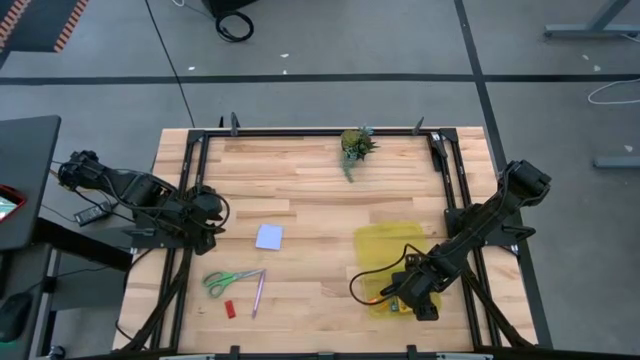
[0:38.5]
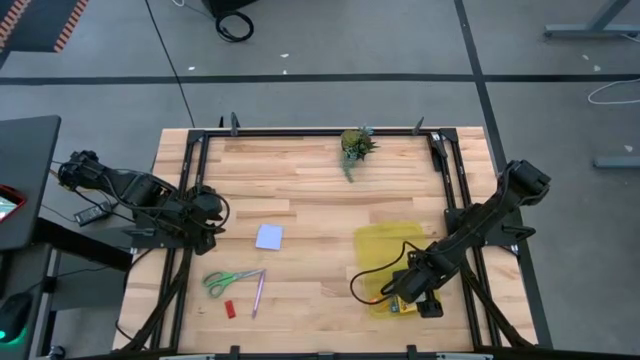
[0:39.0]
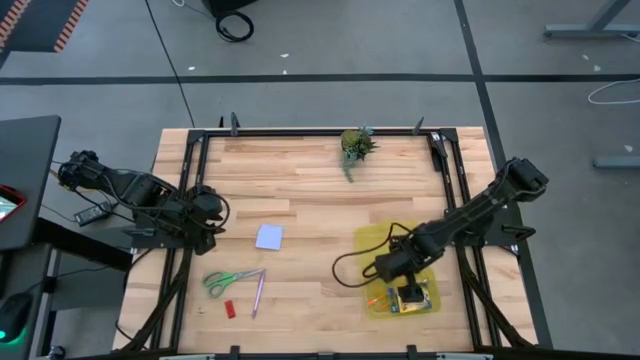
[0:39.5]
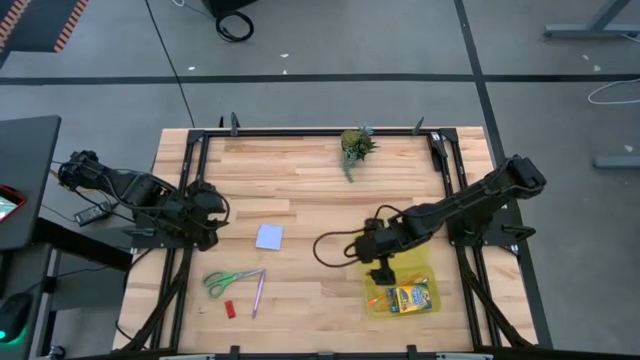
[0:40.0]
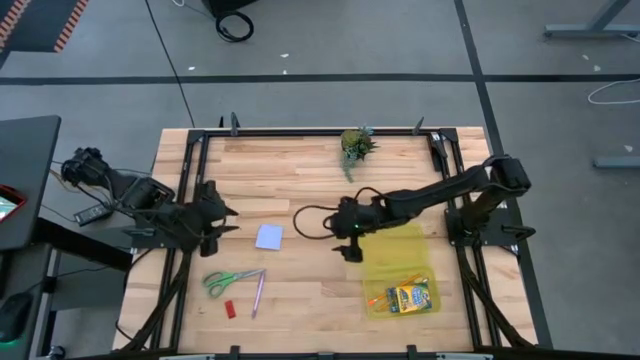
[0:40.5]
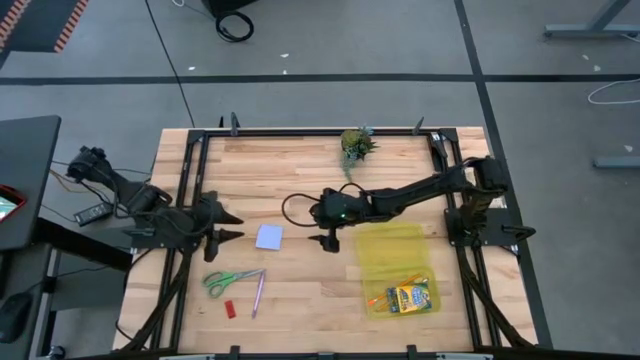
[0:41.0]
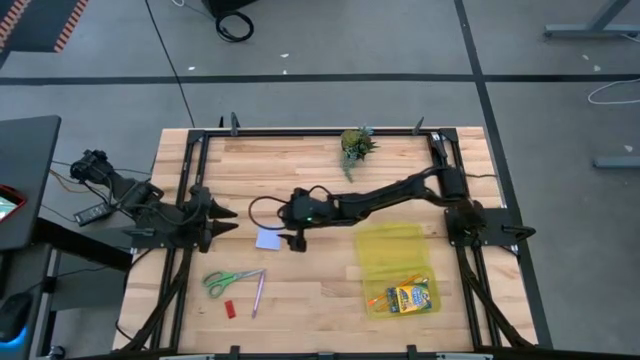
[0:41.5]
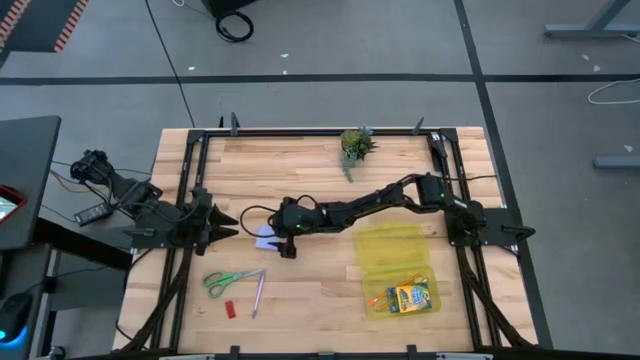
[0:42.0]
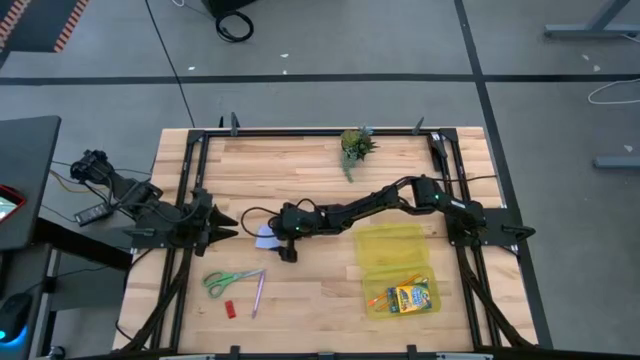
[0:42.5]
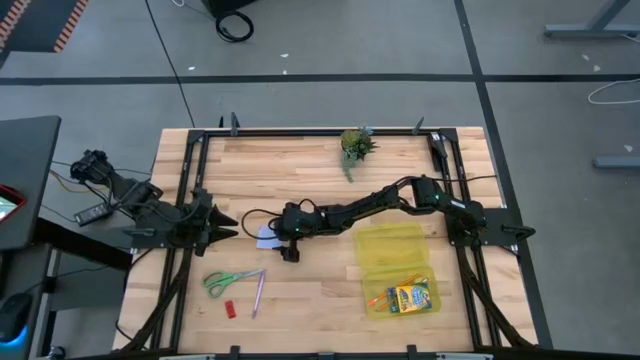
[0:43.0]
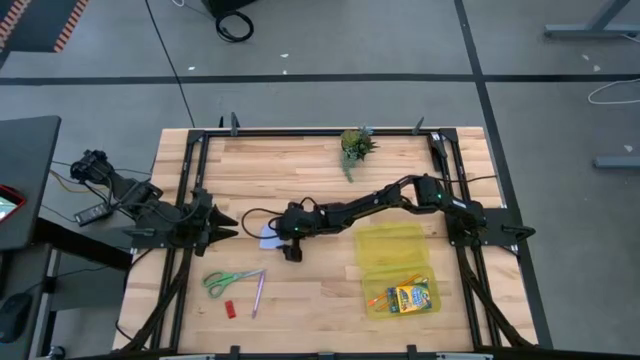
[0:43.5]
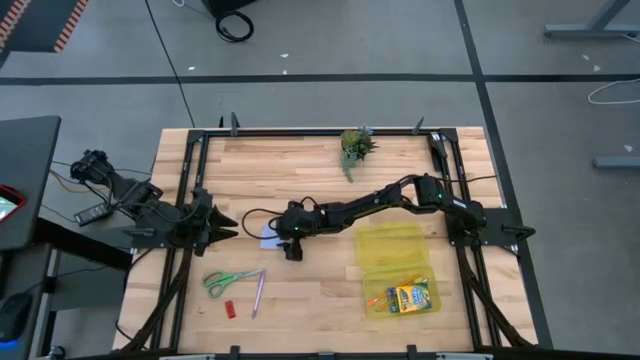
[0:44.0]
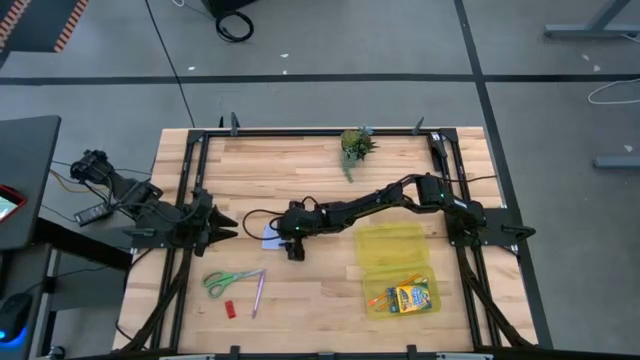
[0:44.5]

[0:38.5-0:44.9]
Task: Pack school essentials
Put the white notepad into the yellow supply box

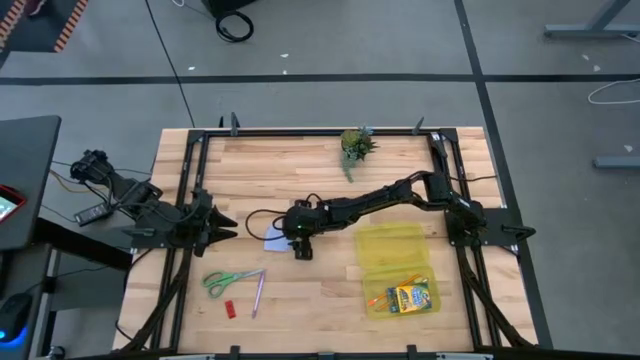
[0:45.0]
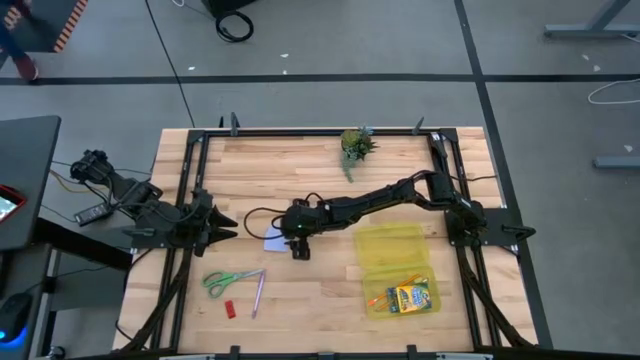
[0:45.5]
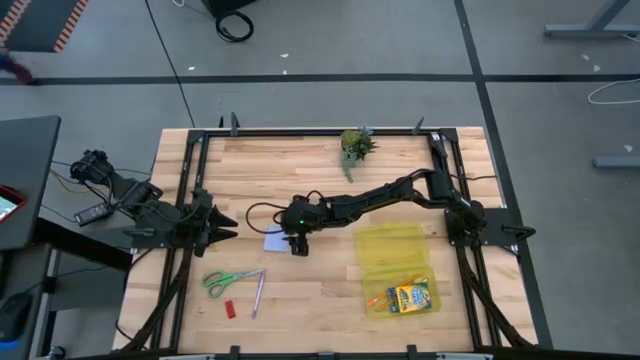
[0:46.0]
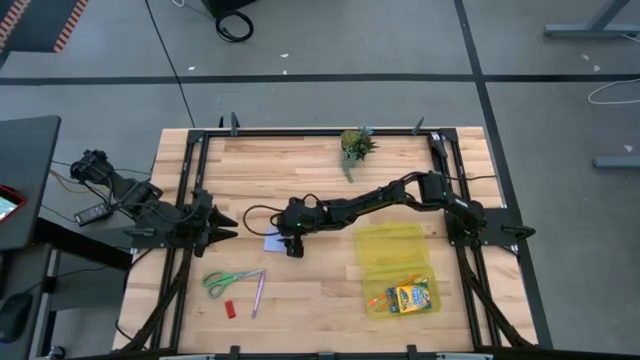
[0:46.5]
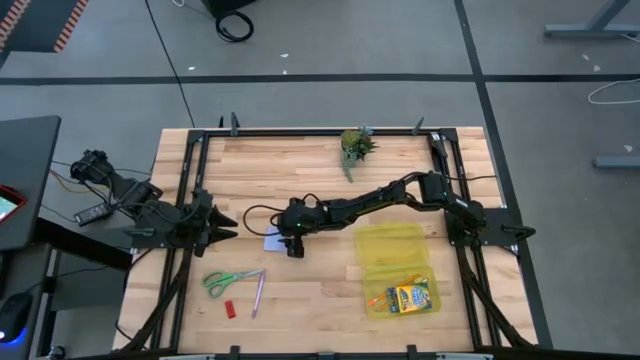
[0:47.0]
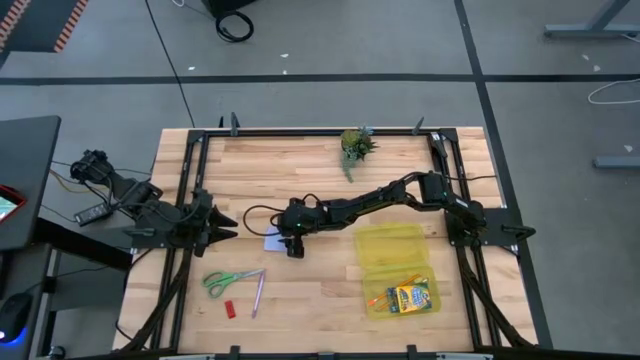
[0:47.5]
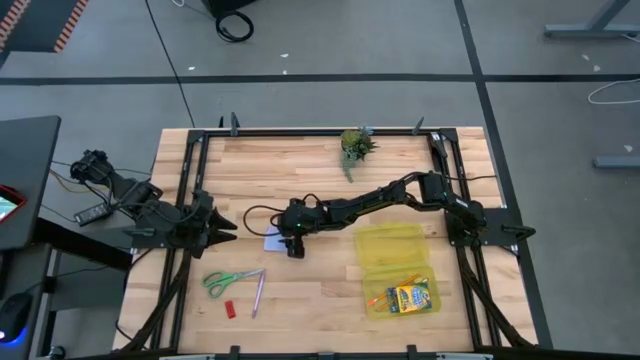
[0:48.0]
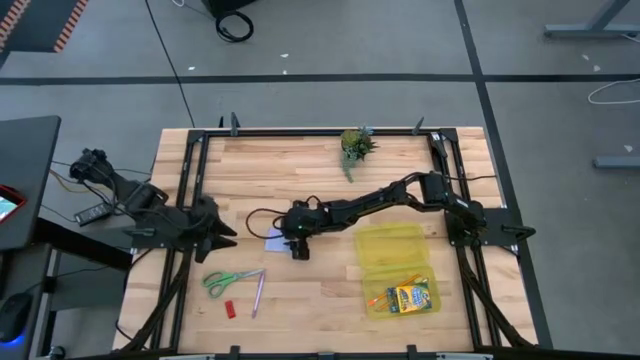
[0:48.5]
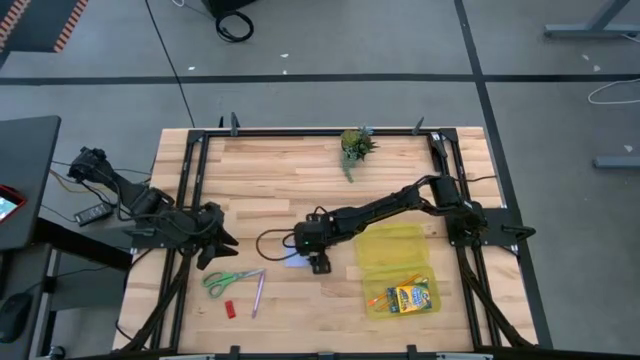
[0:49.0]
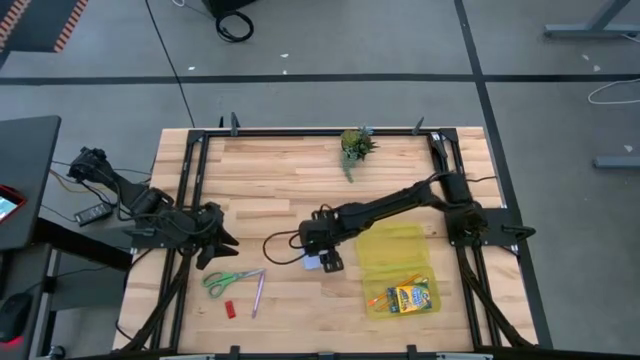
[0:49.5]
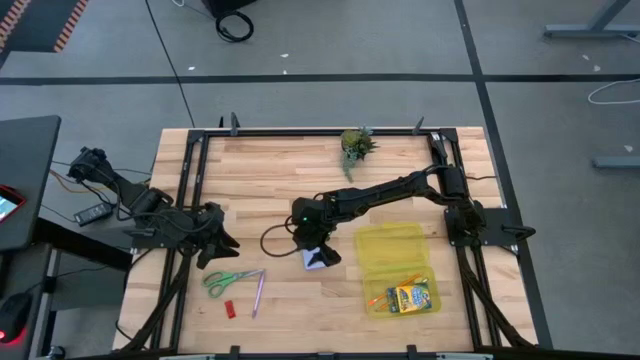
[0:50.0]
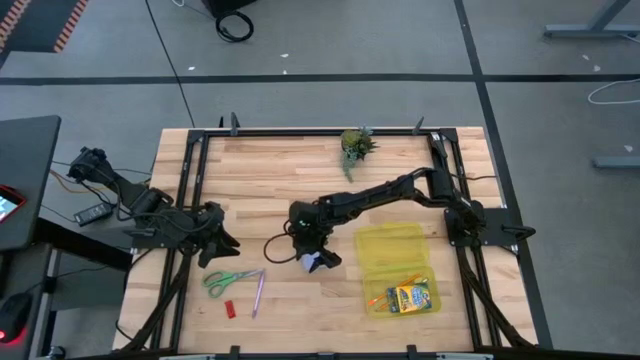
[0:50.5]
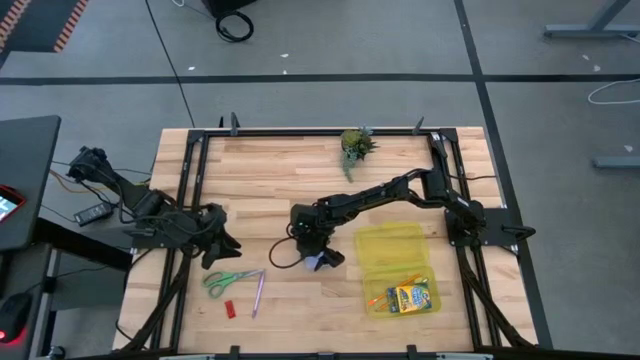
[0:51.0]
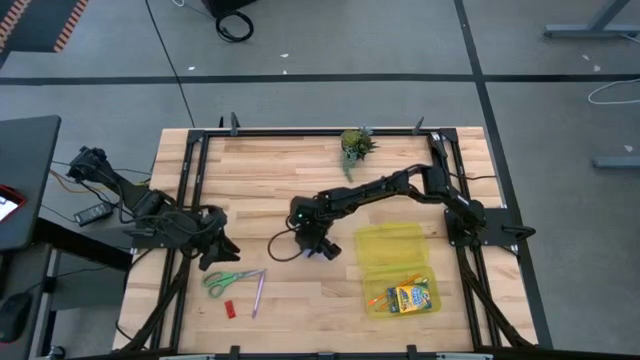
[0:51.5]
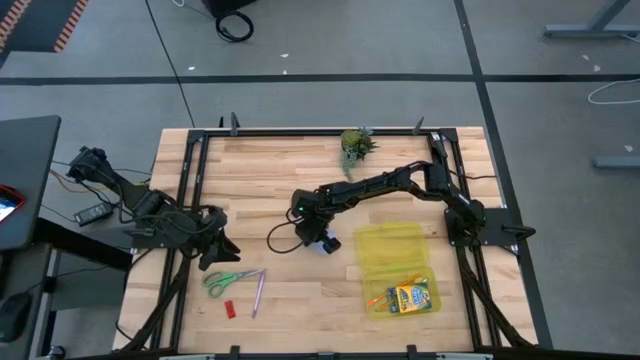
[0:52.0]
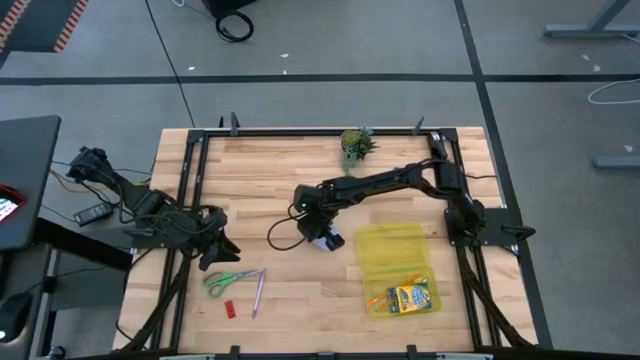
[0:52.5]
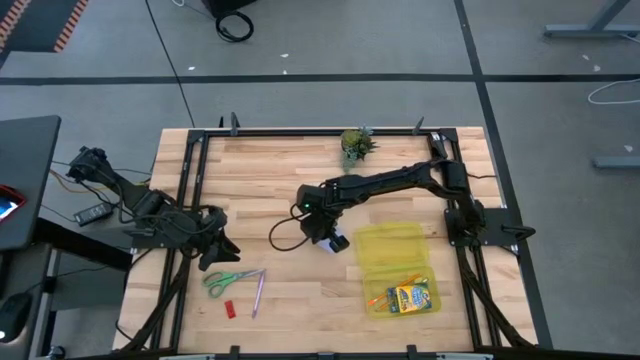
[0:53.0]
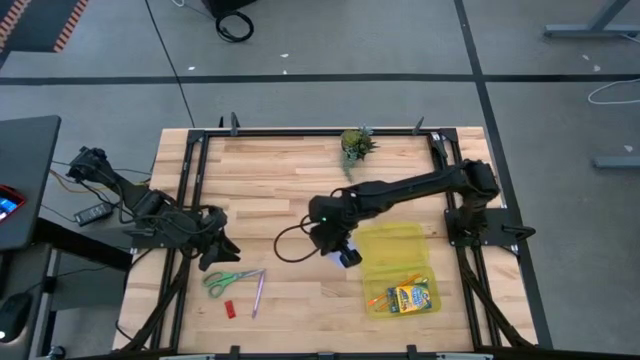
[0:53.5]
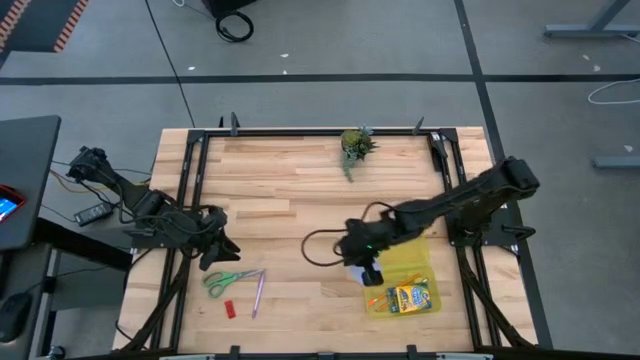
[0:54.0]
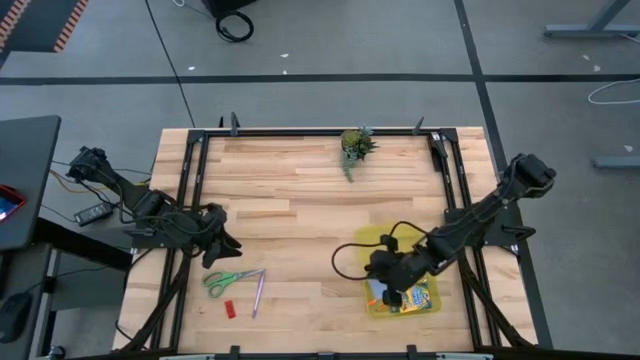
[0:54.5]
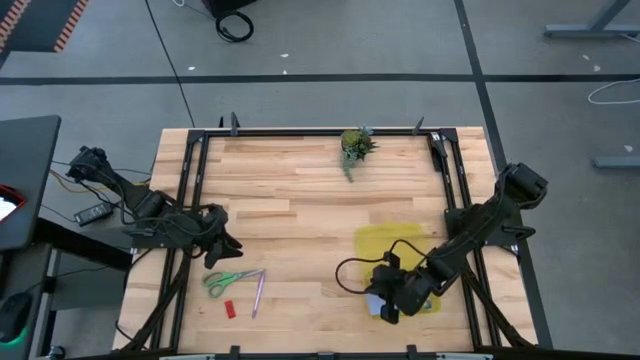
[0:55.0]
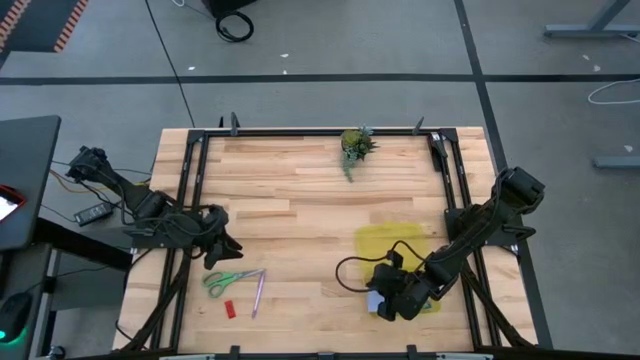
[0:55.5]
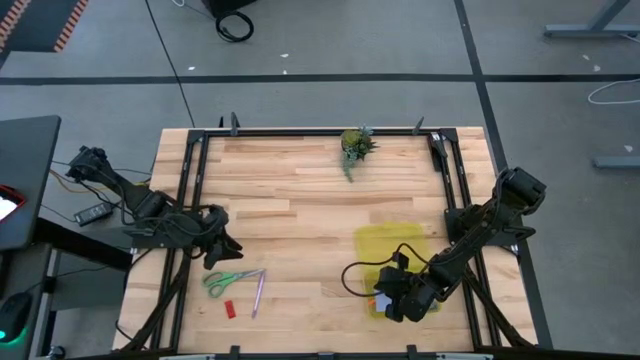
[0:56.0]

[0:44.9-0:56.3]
Put the white sticky notes into the yellow supply box

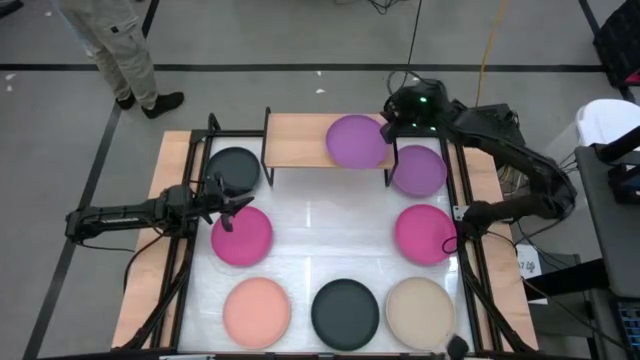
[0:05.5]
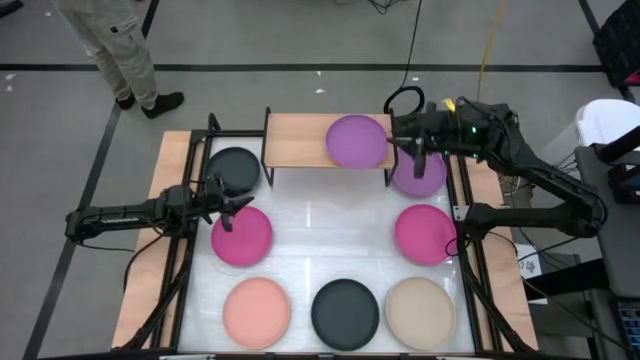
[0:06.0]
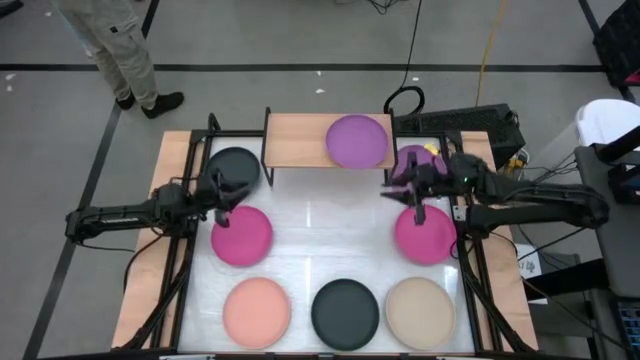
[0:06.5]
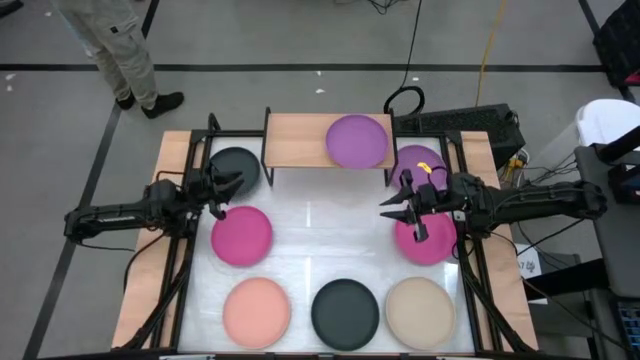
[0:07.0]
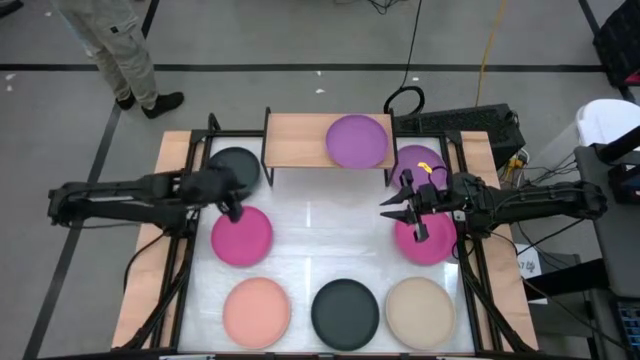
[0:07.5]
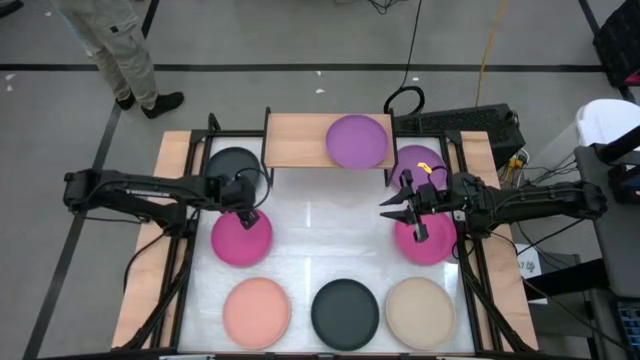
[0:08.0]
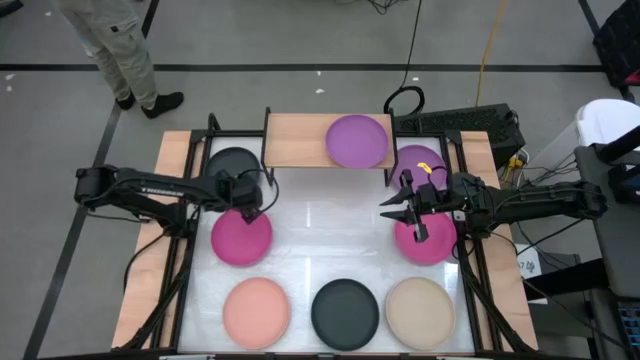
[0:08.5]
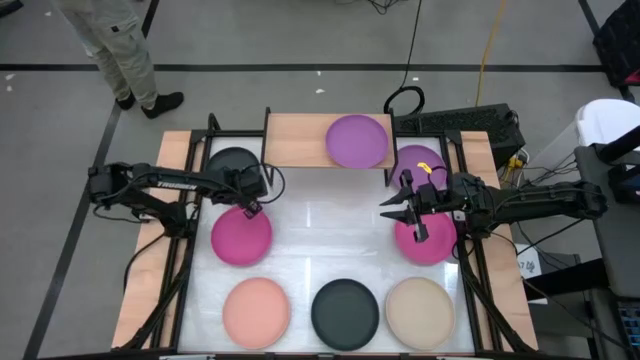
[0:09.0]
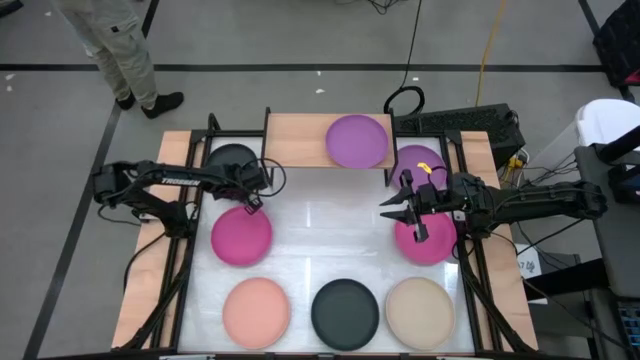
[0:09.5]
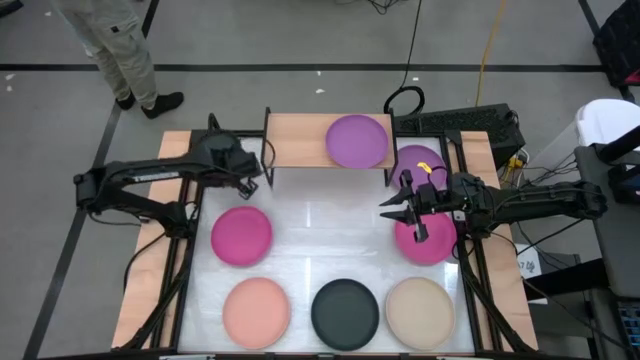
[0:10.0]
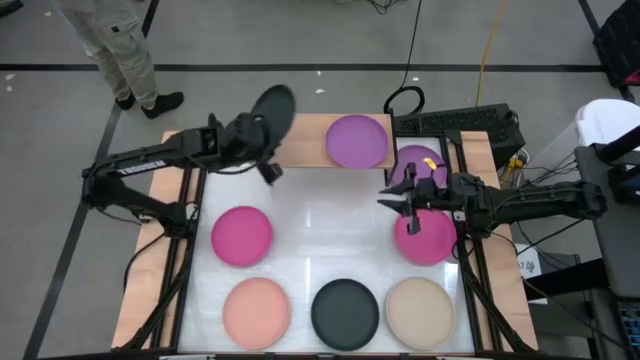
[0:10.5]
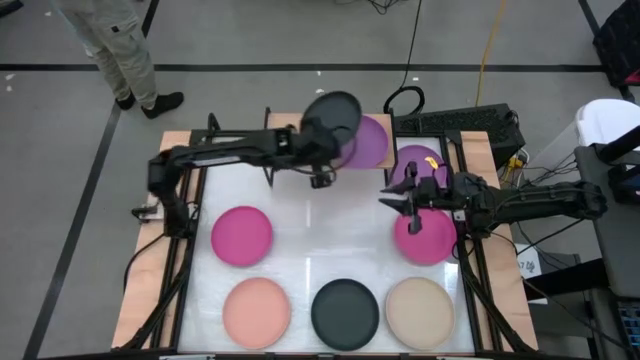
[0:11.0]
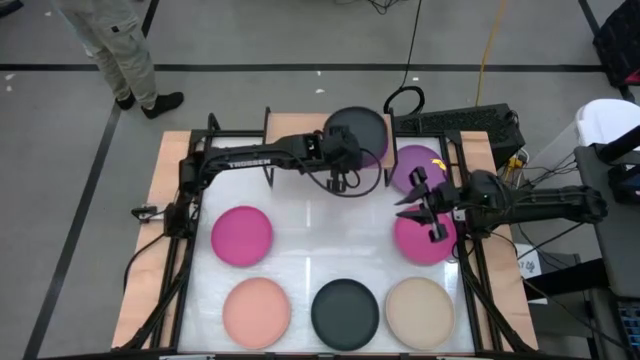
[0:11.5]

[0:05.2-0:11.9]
Task: Place and stack plates onto a shelf
Stack the top black plate on top of the purple plate on the shelf
